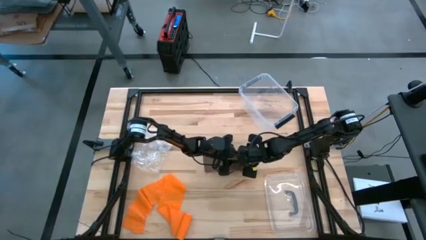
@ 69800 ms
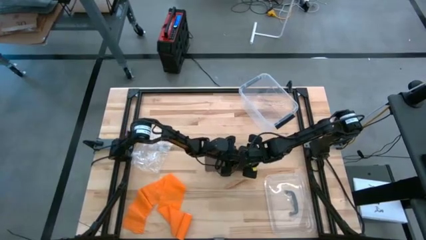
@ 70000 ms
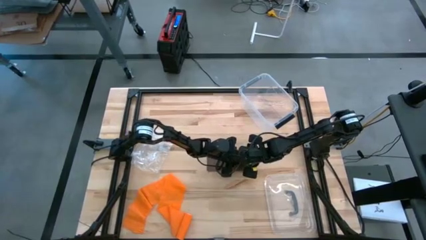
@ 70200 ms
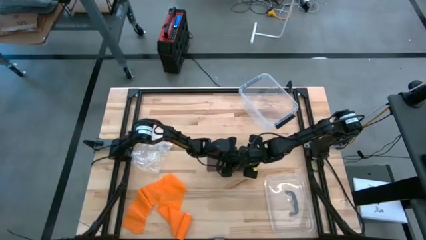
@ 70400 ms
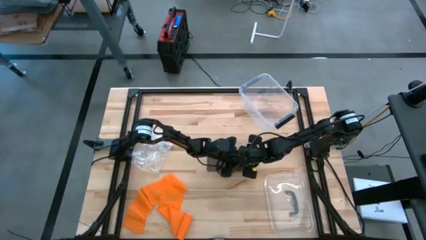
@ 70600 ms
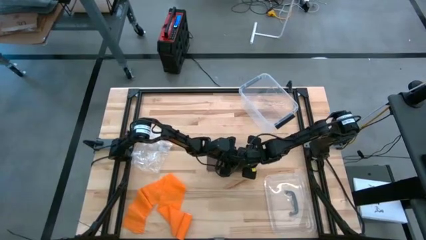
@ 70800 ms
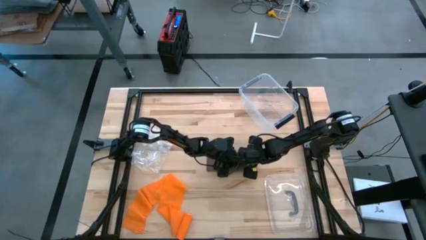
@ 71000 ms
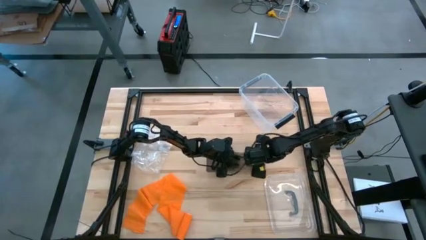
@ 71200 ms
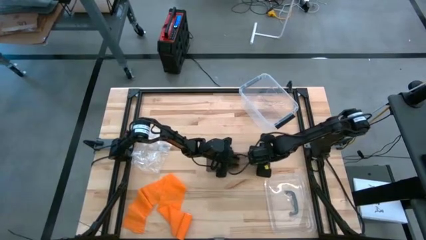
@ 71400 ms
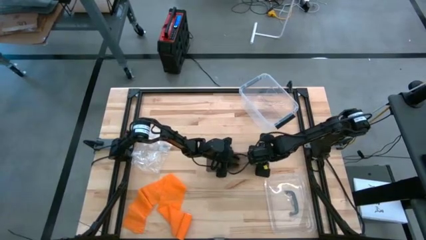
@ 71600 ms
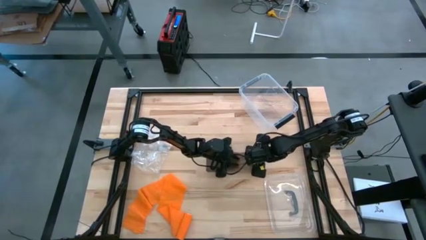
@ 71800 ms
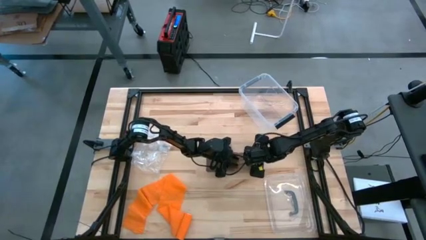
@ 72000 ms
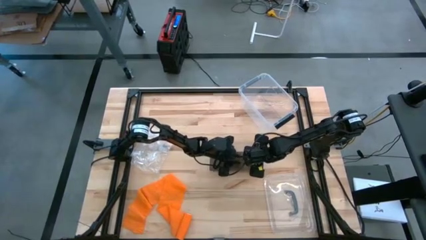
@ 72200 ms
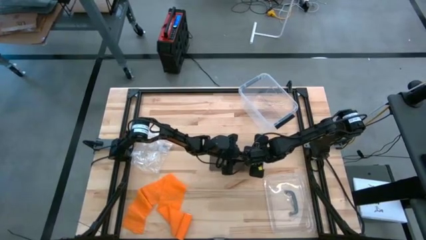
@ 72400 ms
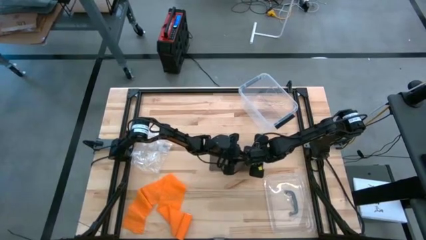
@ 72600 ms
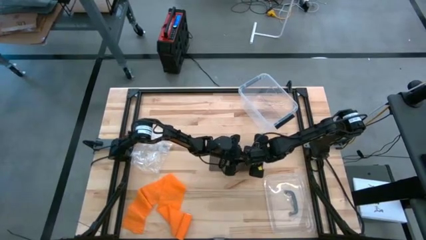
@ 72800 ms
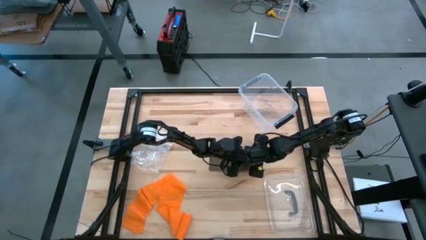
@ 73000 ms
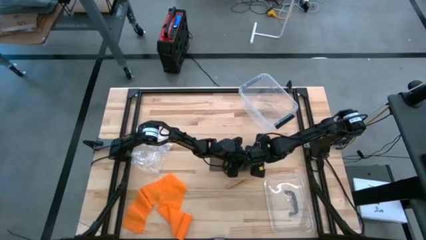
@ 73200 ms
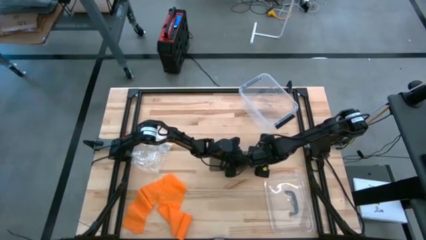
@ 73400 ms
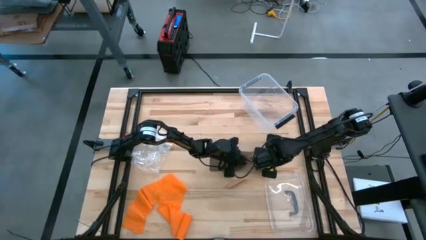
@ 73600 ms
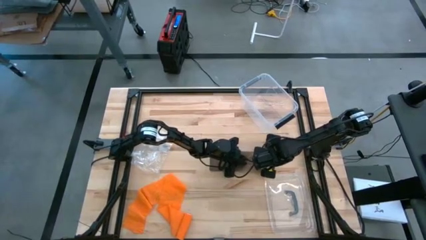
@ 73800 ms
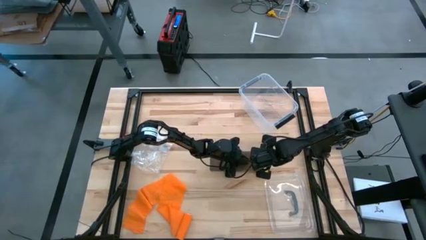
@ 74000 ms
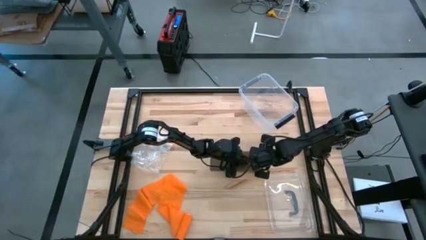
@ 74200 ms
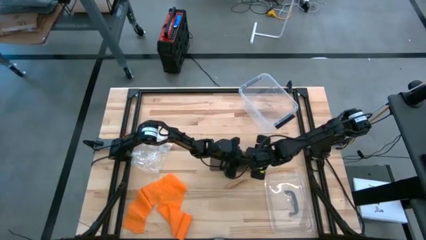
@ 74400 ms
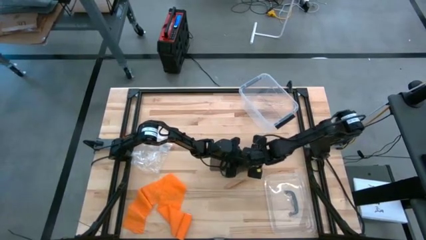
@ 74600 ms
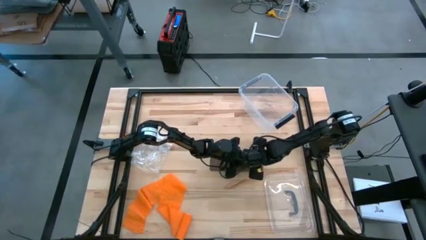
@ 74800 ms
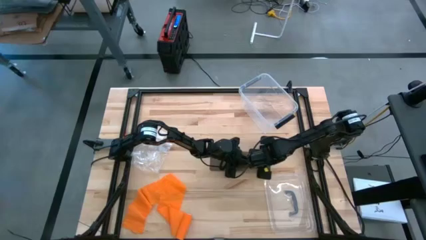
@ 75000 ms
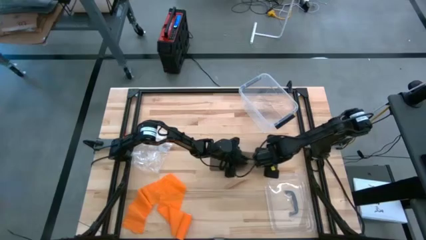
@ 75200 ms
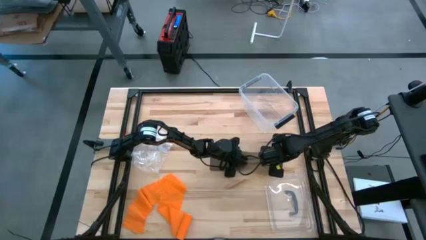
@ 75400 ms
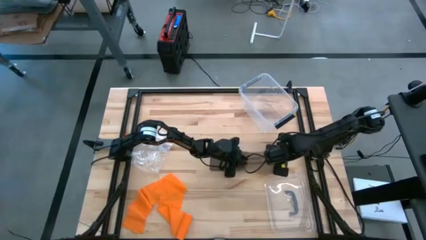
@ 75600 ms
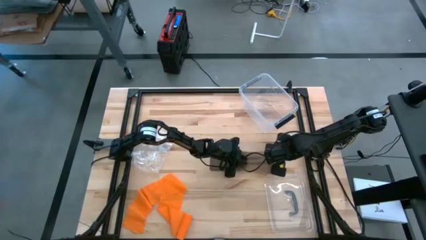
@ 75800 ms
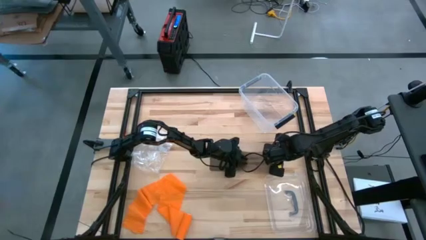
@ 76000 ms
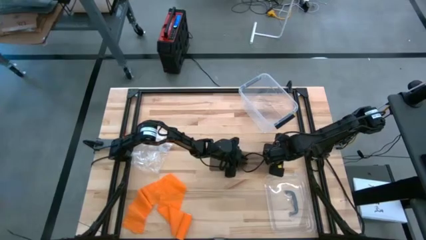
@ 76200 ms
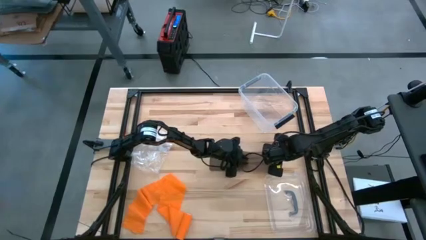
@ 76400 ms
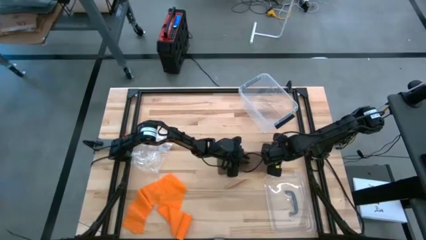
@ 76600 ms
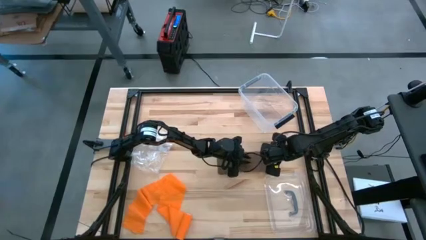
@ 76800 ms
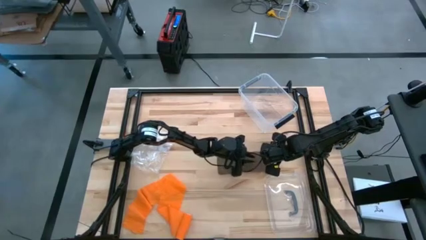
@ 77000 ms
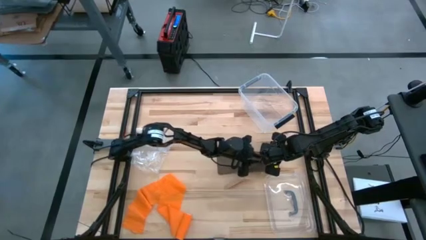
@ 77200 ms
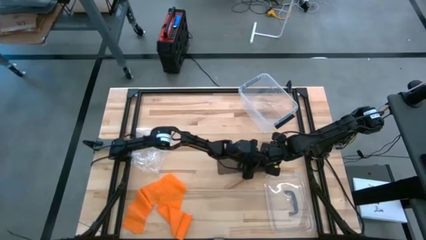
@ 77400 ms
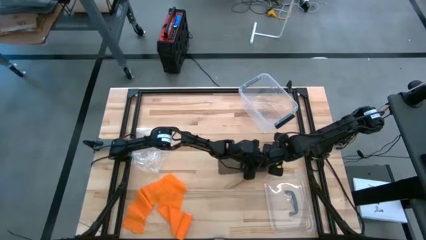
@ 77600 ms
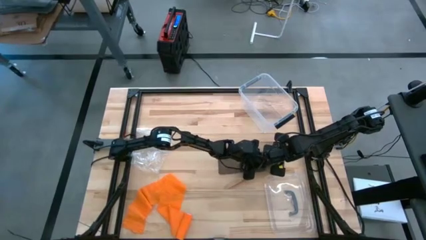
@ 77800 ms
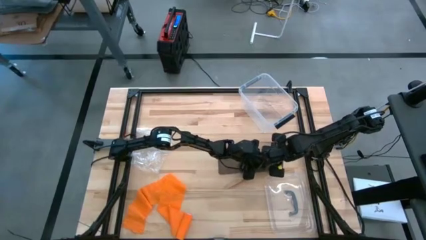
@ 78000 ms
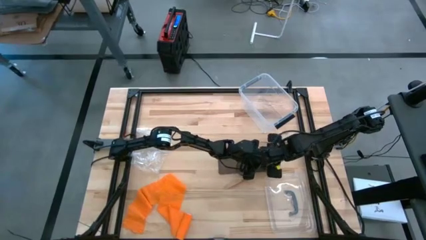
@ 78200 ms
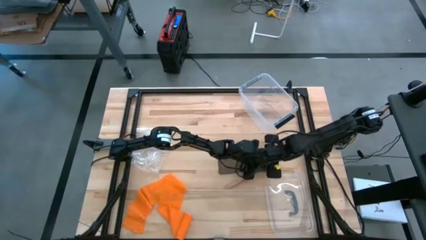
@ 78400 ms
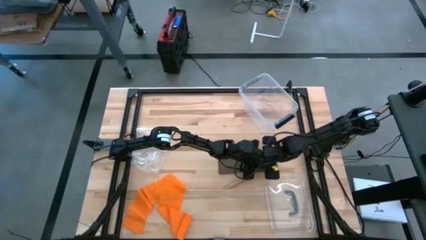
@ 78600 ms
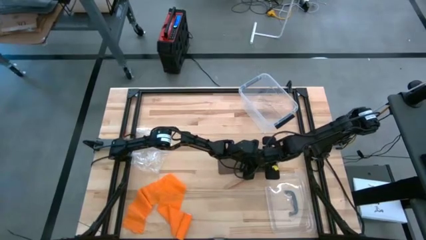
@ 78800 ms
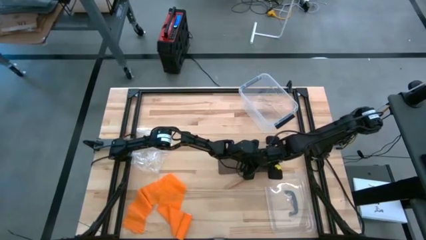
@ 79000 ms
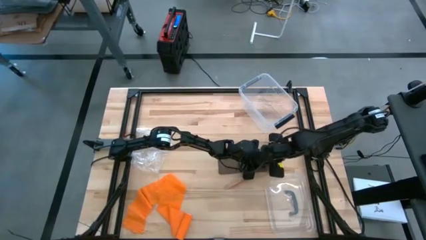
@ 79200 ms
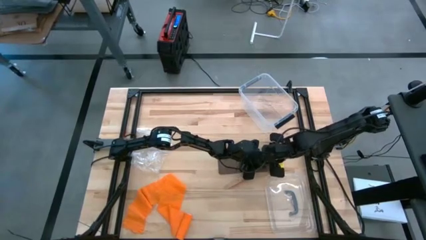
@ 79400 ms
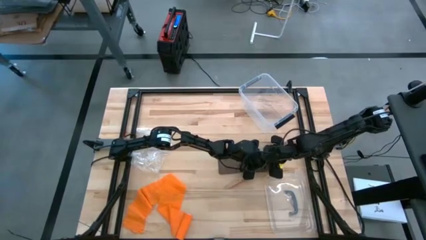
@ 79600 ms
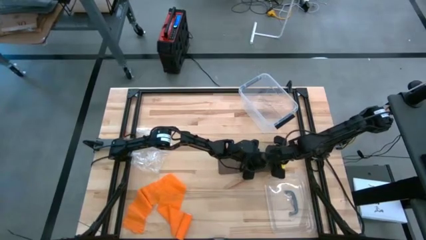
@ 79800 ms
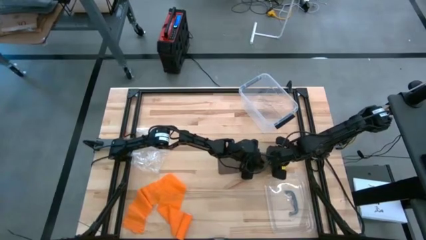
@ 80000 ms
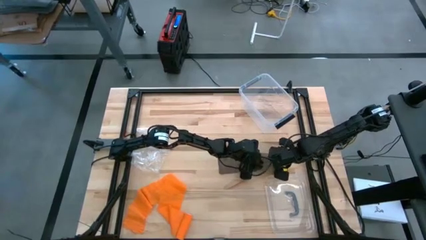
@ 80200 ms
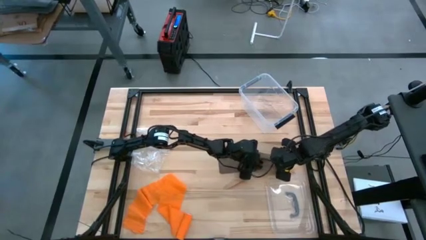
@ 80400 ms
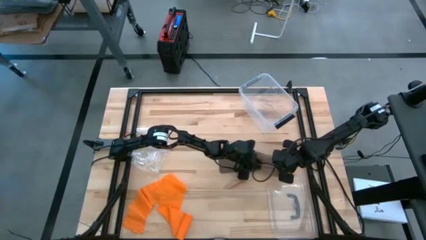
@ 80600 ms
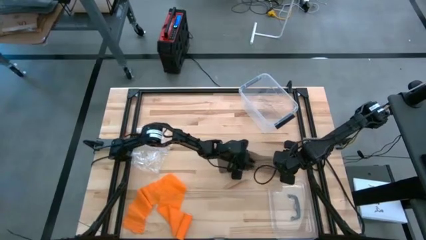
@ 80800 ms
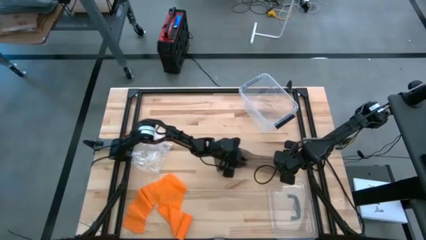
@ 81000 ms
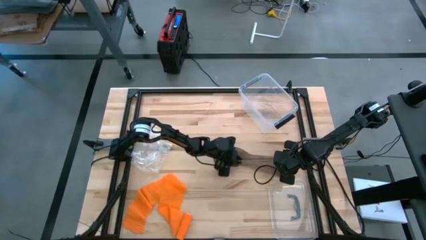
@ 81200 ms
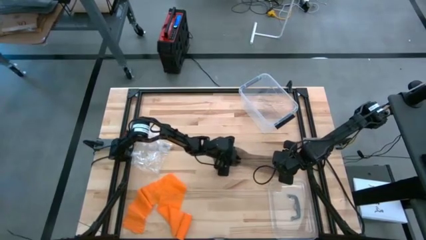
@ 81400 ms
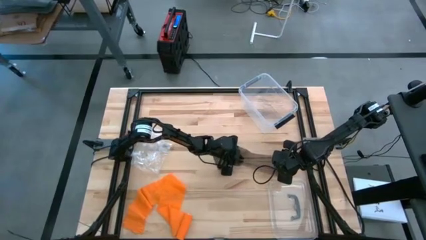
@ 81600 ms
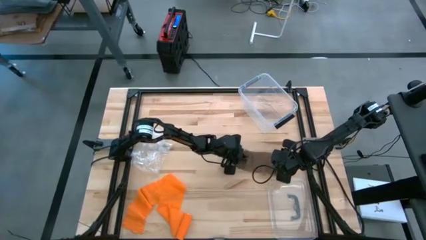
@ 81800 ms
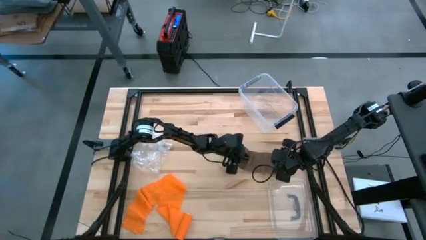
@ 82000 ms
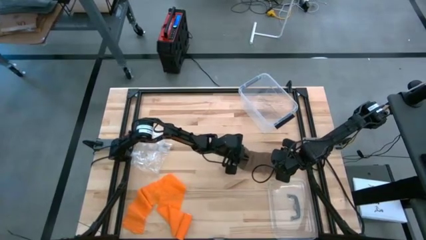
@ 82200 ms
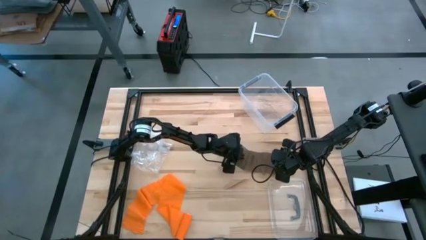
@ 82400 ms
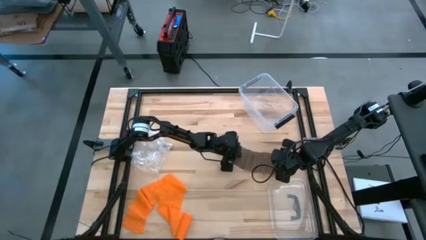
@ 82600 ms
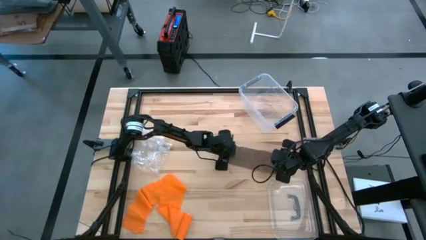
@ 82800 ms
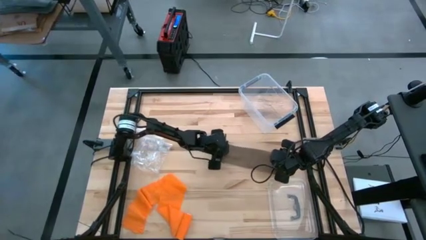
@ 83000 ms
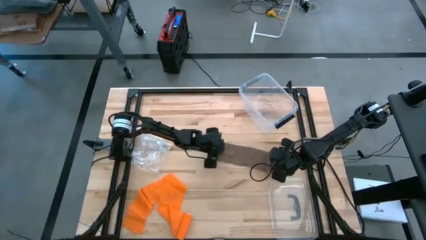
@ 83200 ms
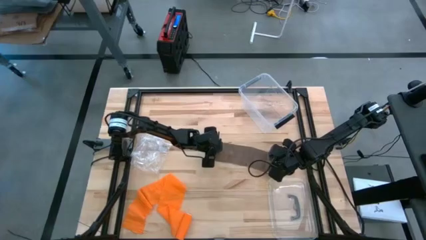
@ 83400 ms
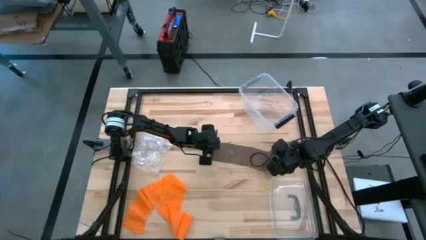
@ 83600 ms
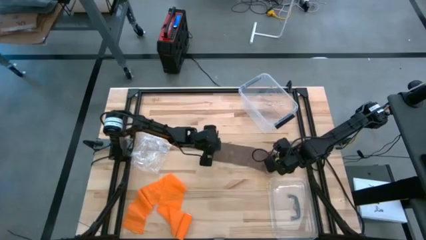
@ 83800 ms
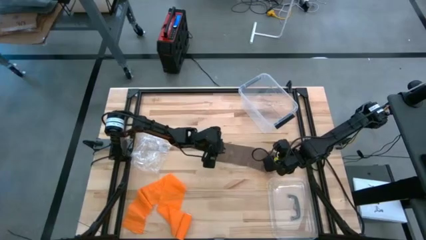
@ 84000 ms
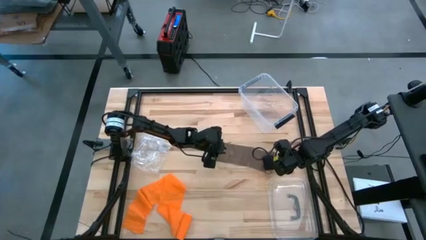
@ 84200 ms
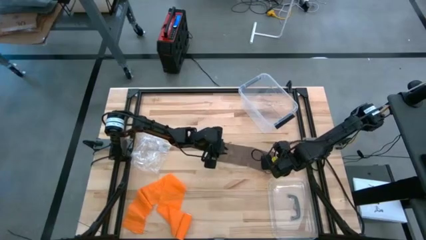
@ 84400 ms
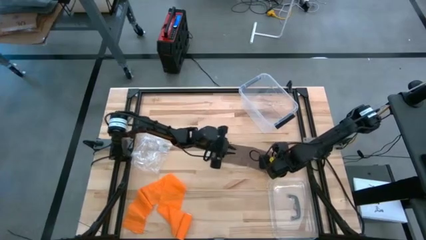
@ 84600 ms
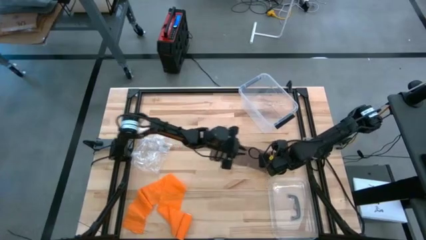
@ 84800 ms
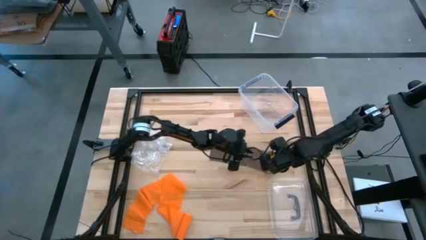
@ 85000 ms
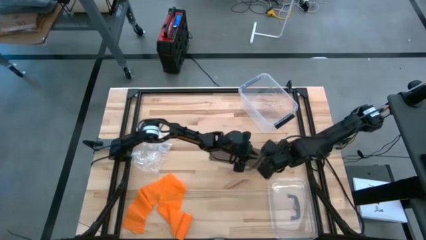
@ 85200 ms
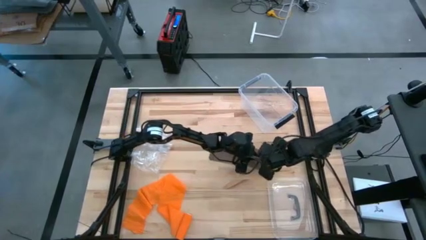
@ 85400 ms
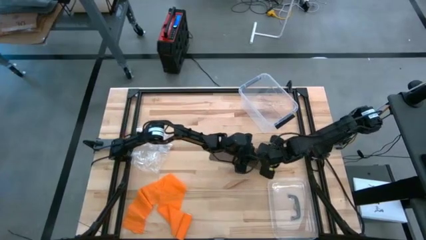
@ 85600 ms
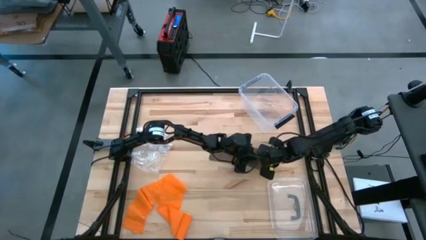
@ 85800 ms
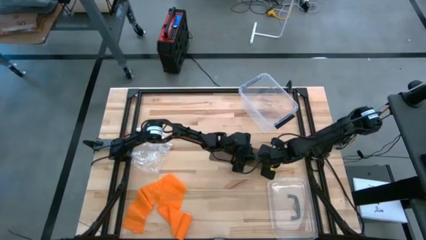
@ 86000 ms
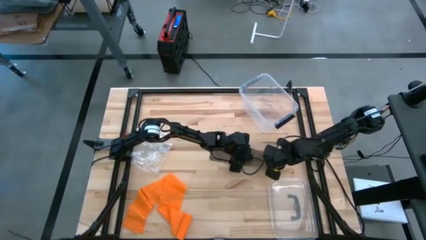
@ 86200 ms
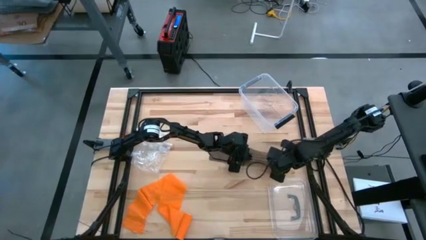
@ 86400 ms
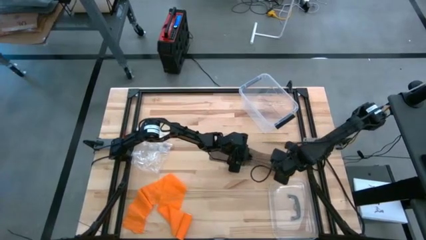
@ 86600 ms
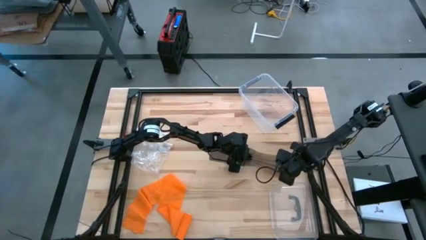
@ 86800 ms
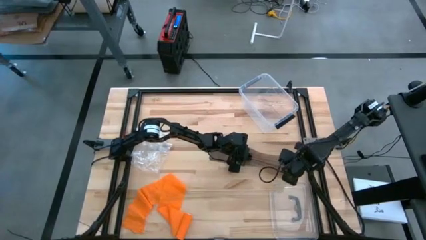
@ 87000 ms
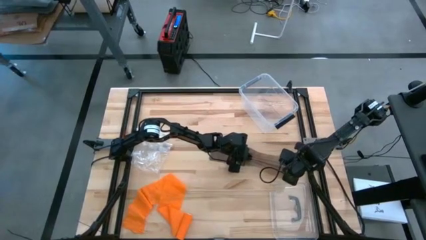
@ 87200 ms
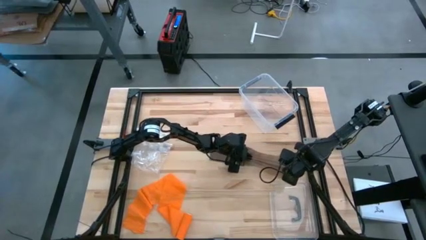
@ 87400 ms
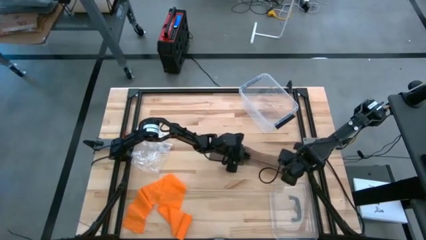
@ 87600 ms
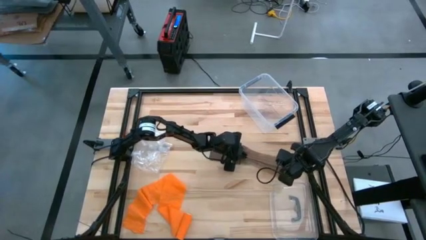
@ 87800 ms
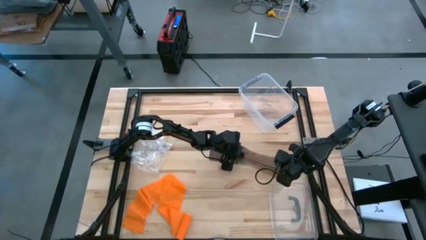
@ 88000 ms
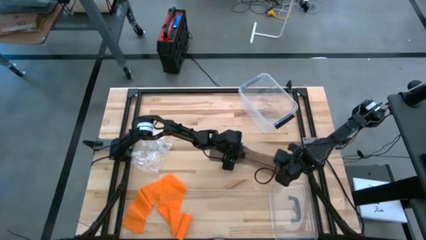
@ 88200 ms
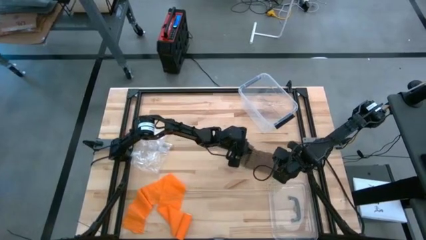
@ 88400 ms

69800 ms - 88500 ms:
Task: Roll bandage
Uncoil the brown bandage
